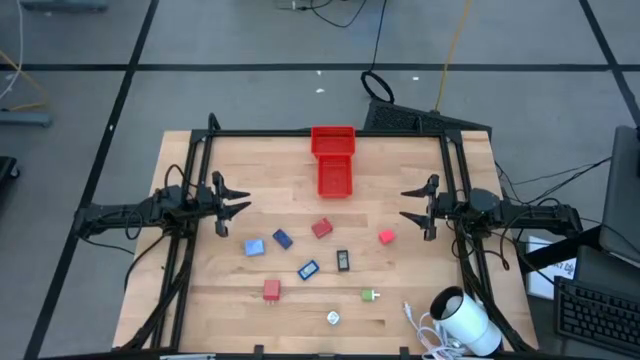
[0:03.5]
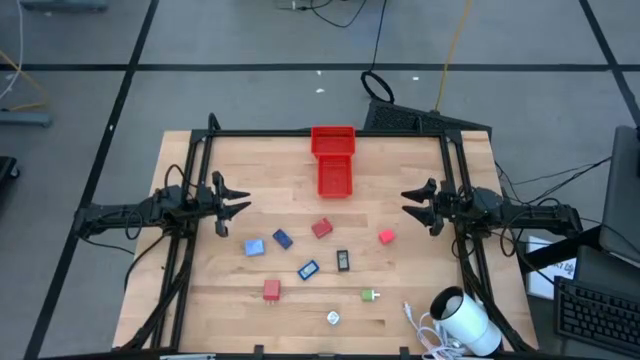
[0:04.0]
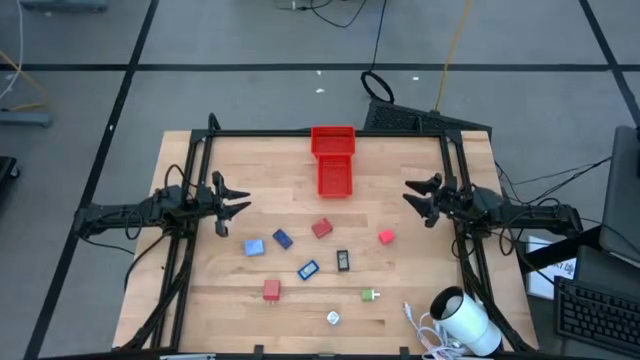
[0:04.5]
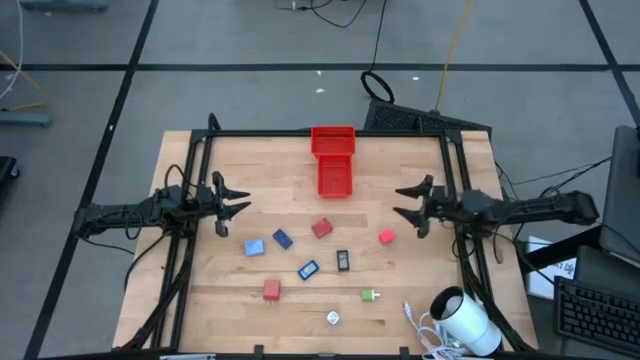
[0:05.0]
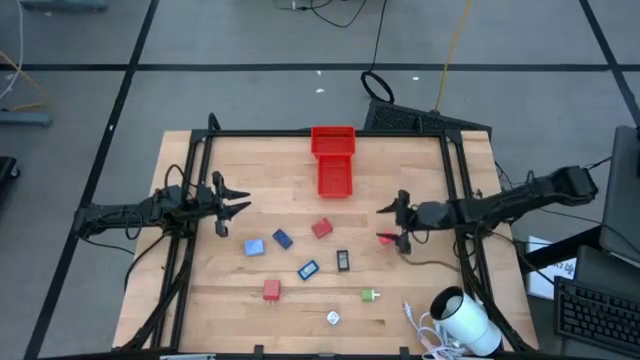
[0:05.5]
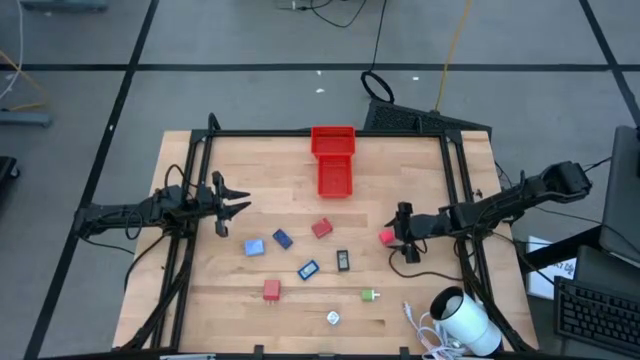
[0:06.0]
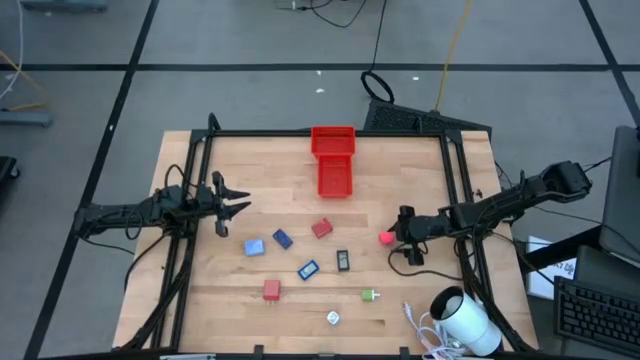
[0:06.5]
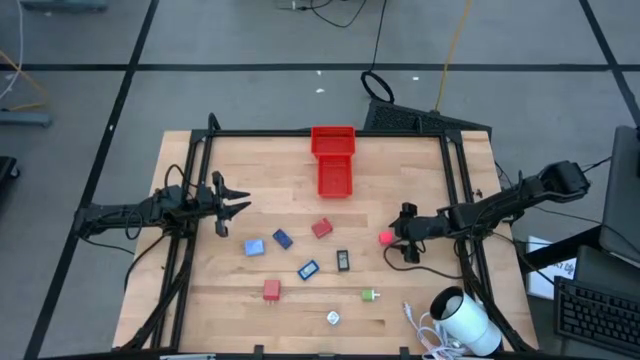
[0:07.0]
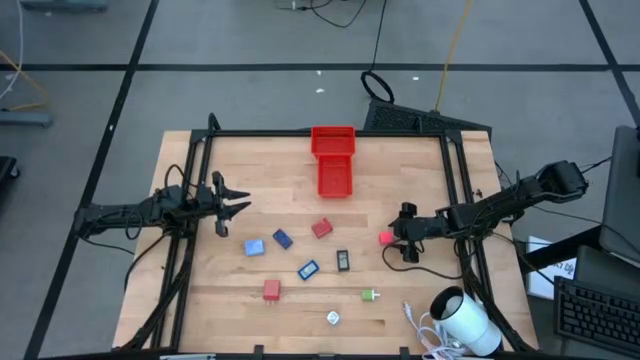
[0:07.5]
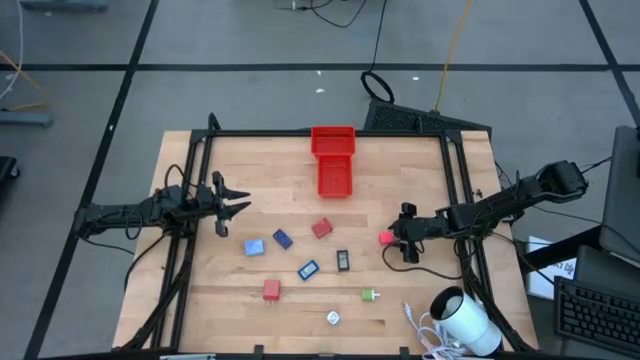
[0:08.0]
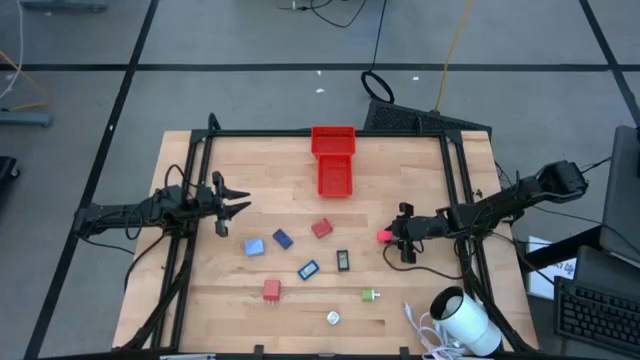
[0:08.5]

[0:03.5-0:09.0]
Task: Pick & Place Office items
Put the pink charger adapter into the top red bin

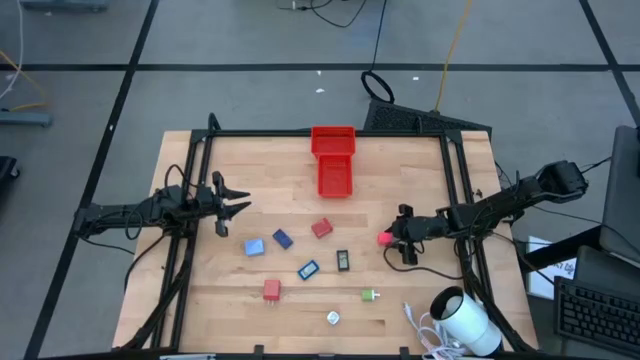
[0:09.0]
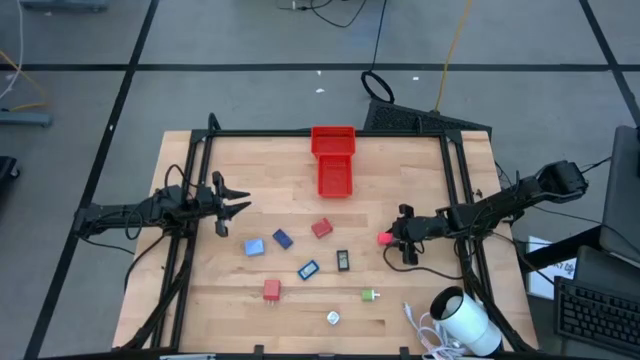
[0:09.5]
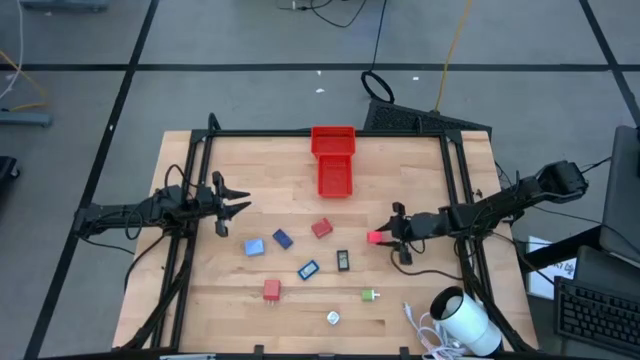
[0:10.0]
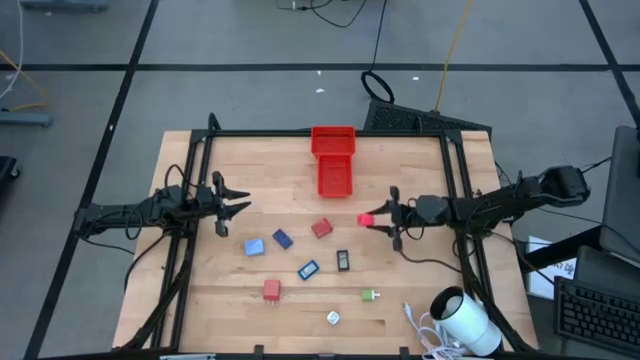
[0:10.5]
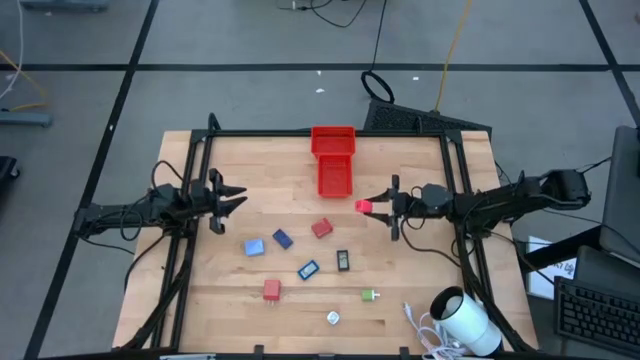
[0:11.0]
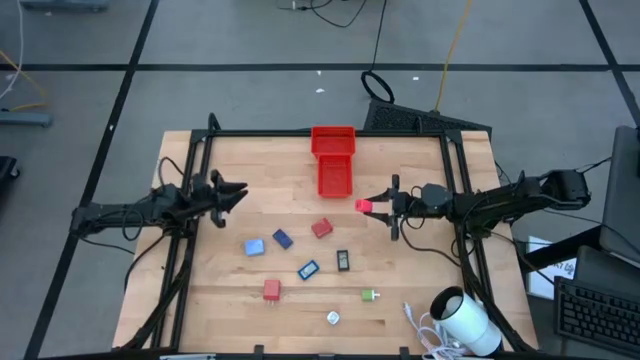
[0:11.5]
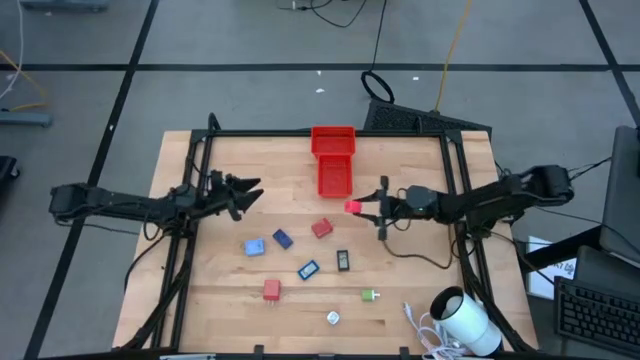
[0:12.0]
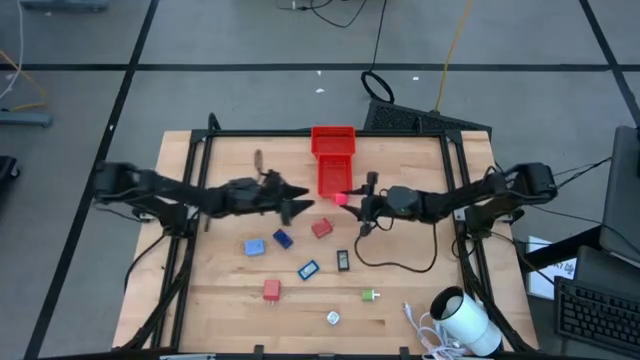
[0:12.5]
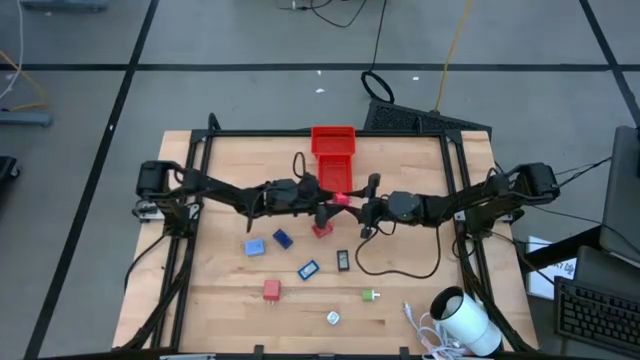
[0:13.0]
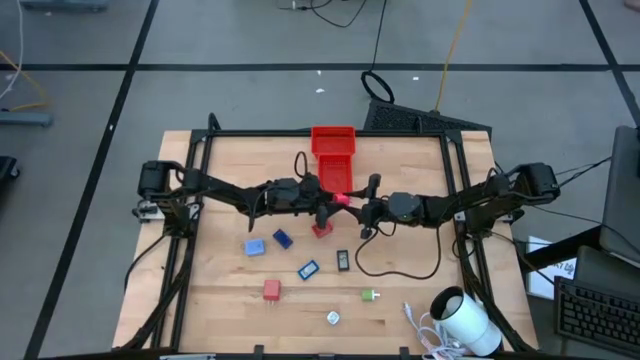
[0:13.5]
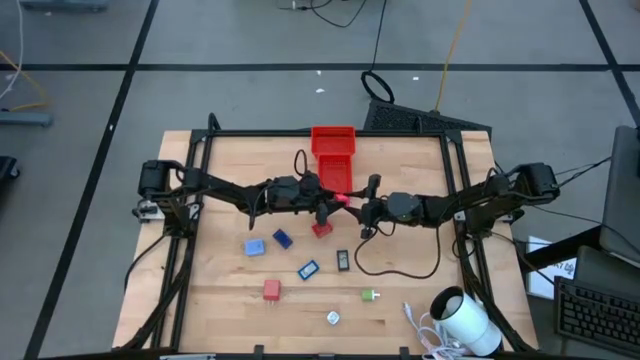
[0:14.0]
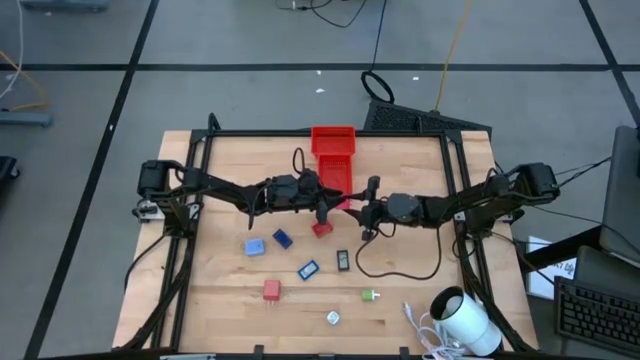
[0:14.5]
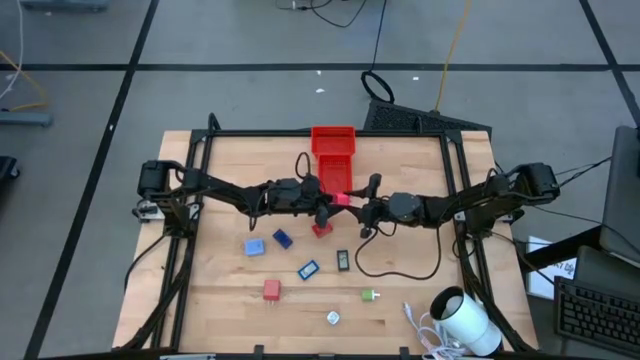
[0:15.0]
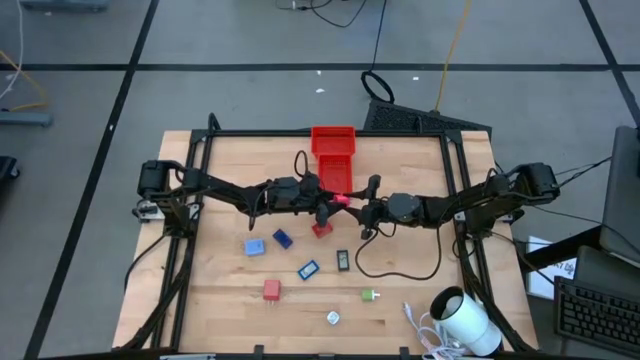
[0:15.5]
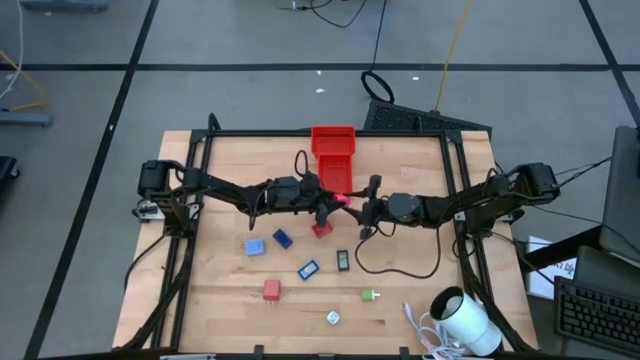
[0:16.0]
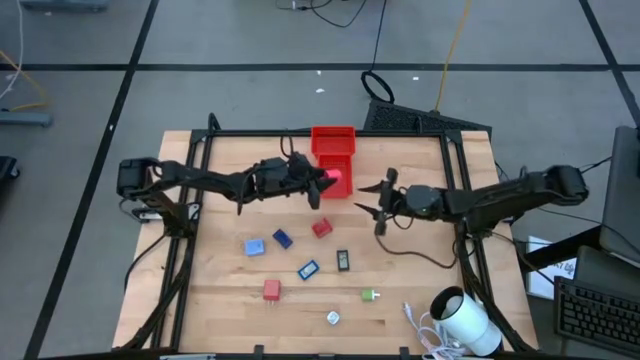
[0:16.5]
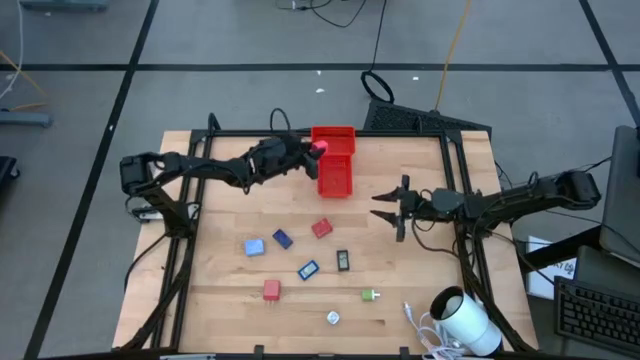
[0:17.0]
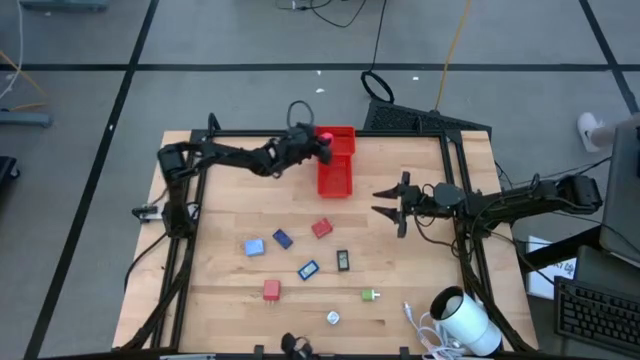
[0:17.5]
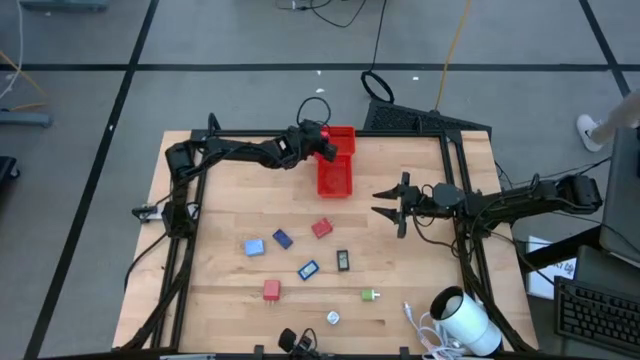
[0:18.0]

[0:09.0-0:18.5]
Put the pink charger adapter into the top red bin

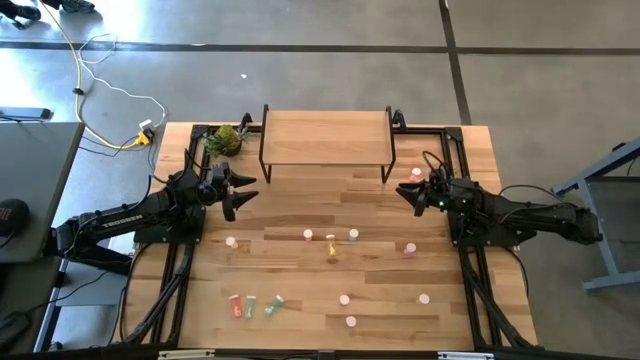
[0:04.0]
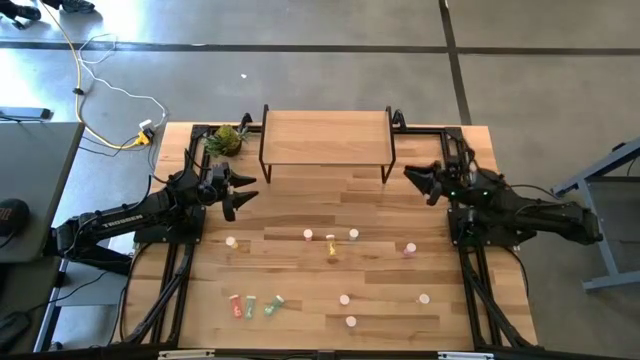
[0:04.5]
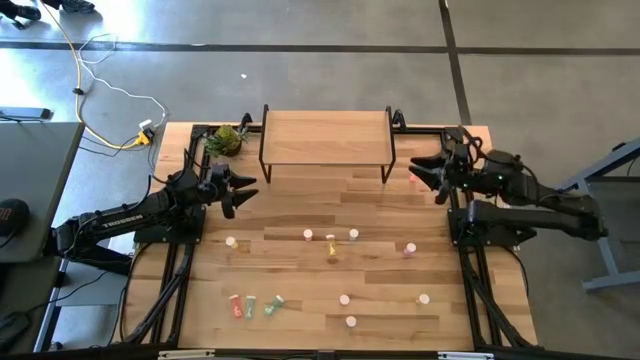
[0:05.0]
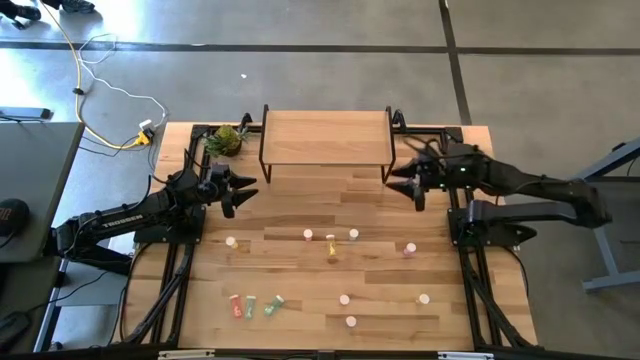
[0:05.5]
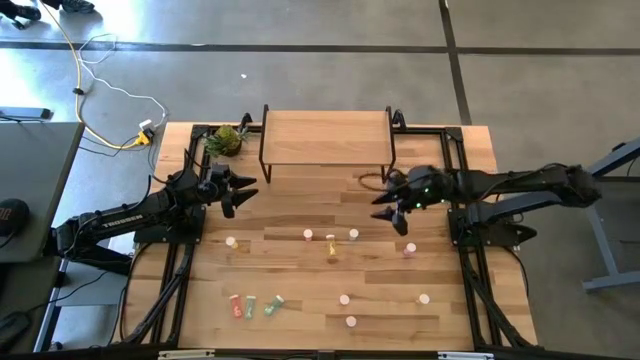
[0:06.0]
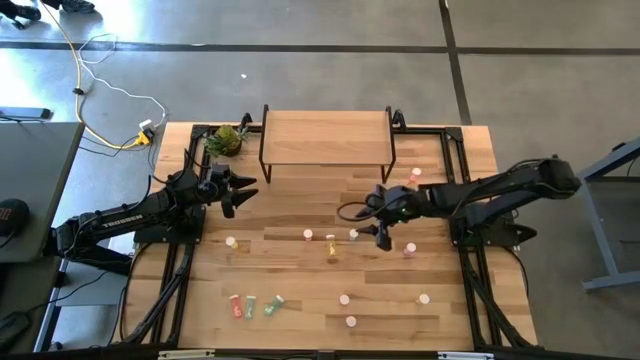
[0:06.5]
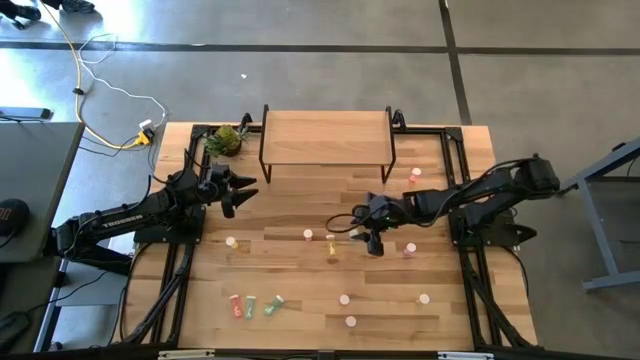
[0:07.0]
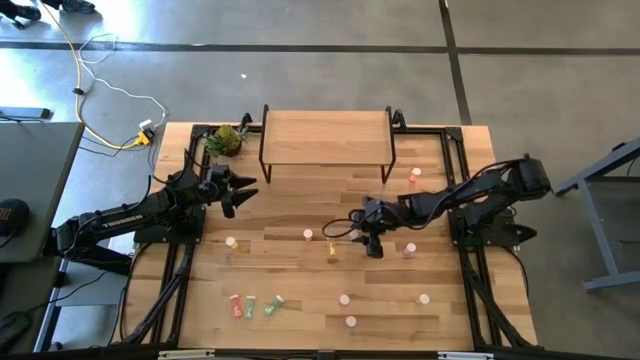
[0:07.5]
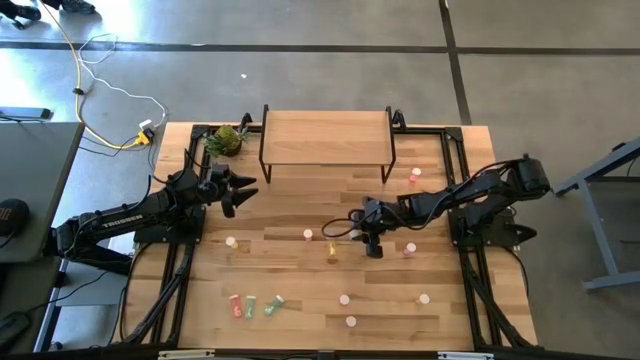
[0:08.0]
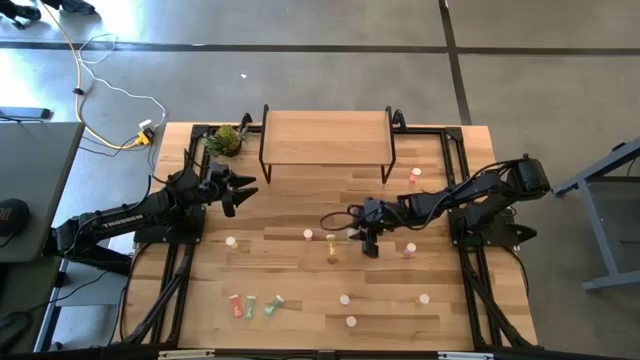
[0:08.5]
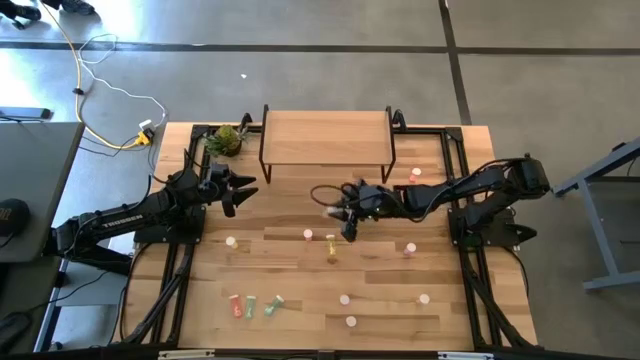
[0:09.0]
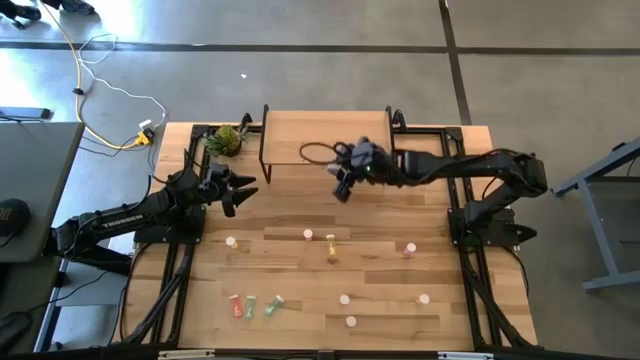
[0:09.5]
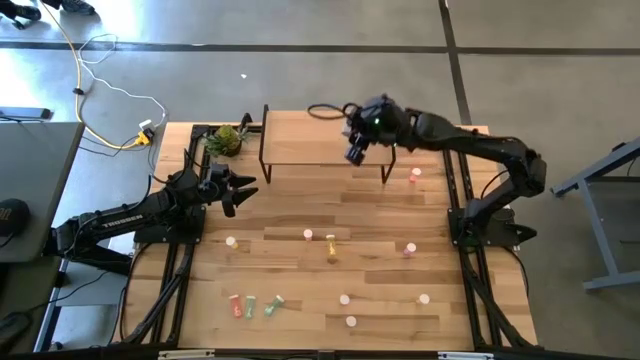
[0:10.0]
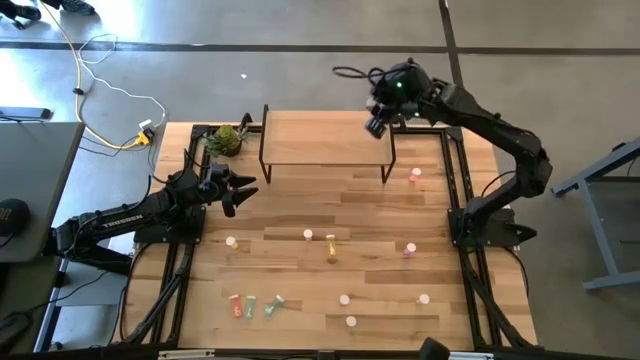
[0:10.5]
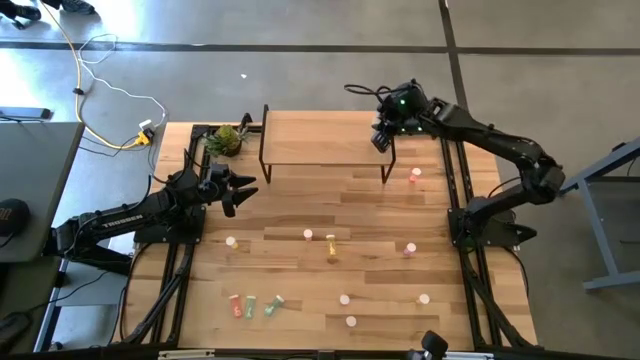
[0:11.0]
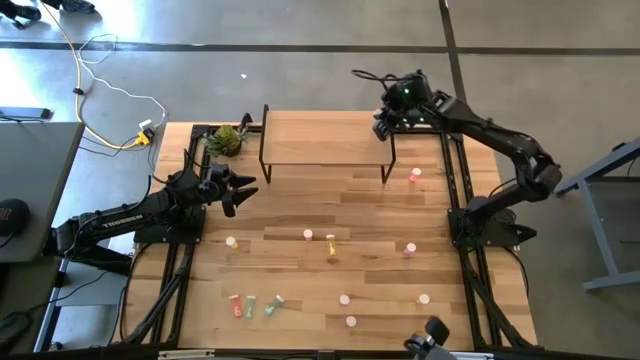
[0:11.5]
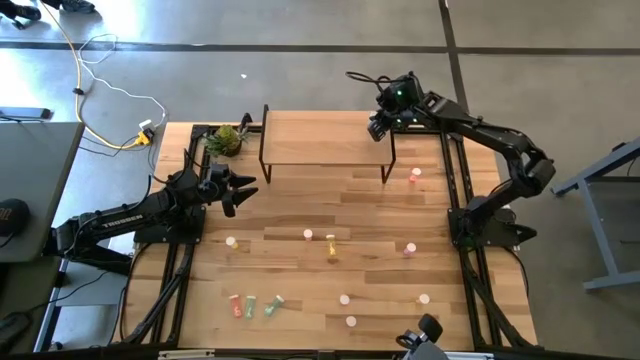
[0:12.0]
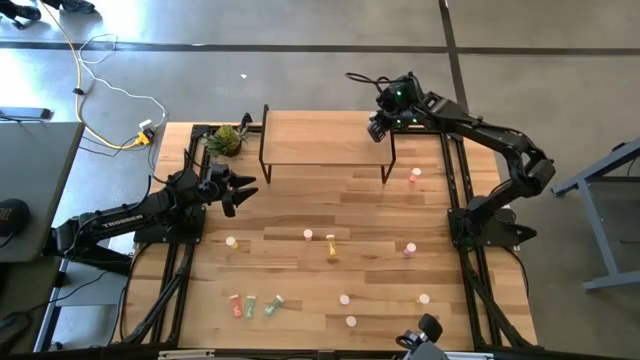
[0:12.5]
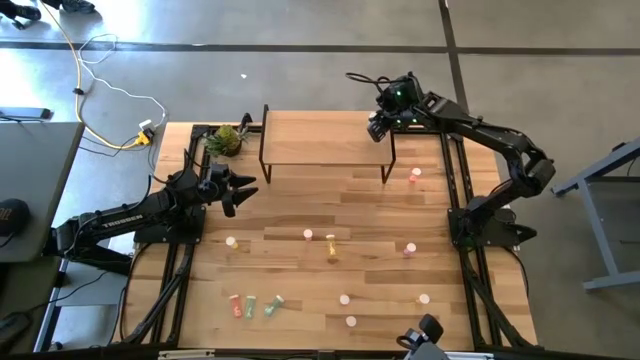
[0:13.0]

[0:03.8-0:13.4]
Task: Pick and place medicine bottles onto shelf by color
Put the top right blue pill bottle on the shelf
